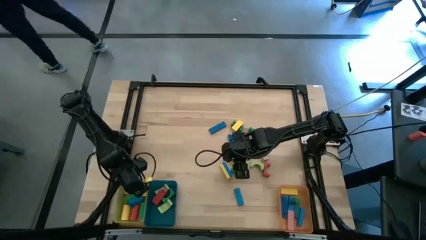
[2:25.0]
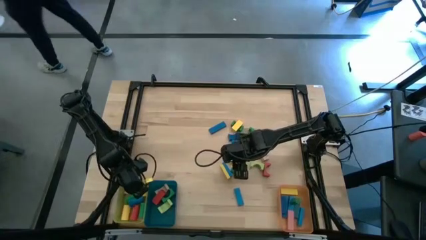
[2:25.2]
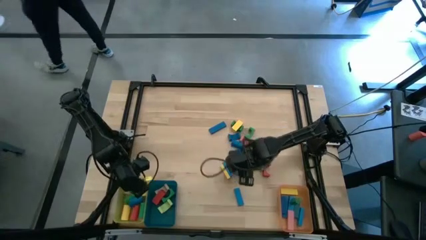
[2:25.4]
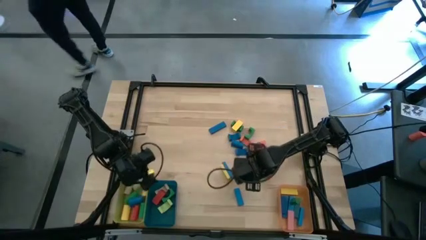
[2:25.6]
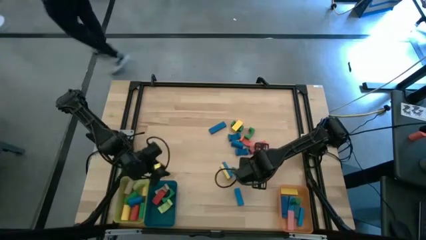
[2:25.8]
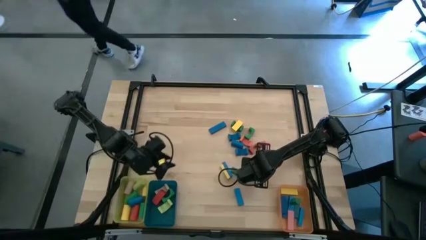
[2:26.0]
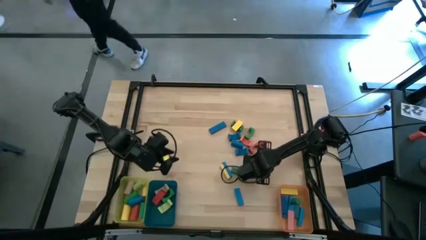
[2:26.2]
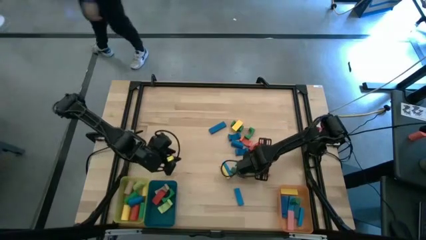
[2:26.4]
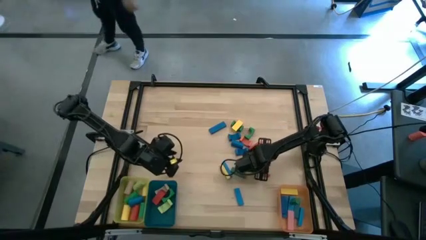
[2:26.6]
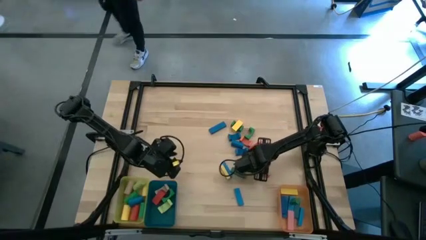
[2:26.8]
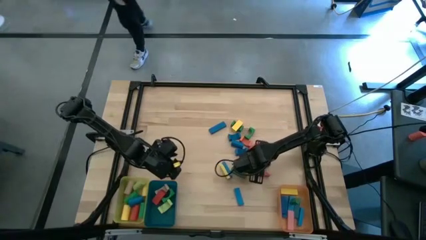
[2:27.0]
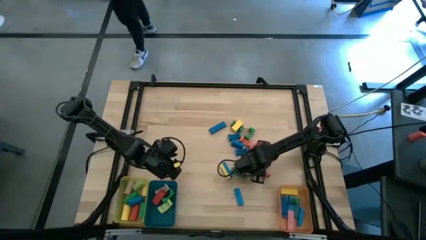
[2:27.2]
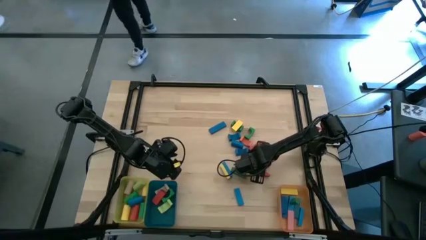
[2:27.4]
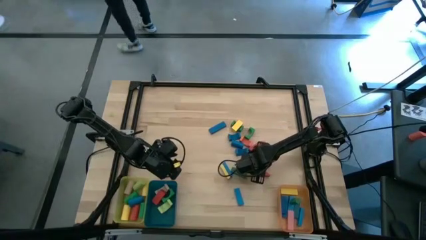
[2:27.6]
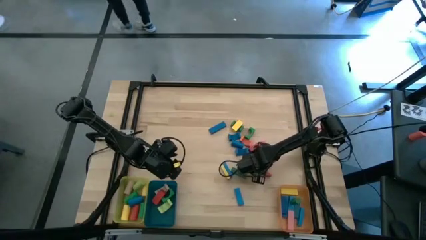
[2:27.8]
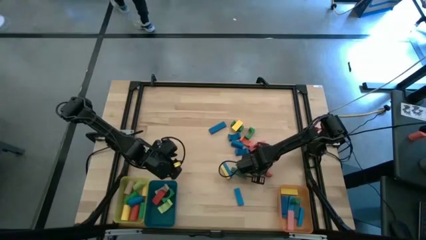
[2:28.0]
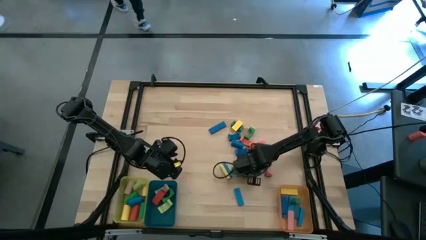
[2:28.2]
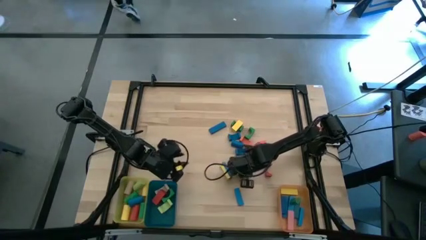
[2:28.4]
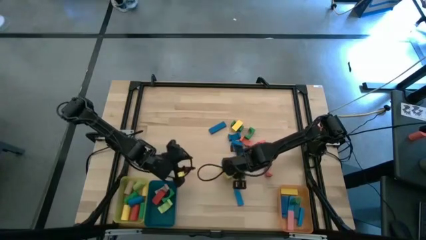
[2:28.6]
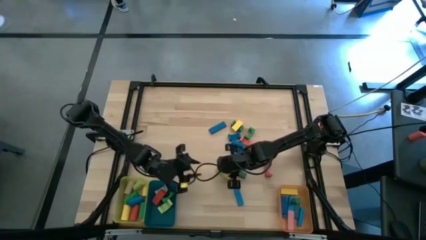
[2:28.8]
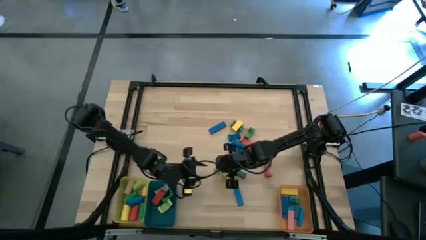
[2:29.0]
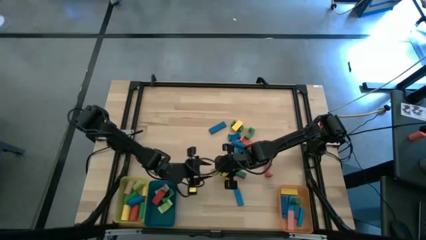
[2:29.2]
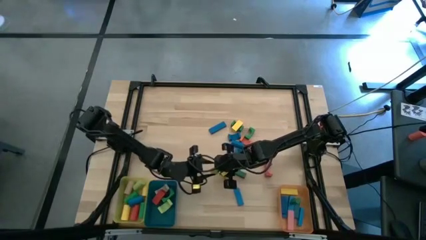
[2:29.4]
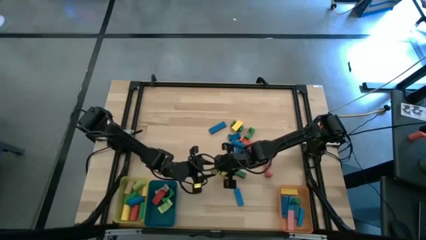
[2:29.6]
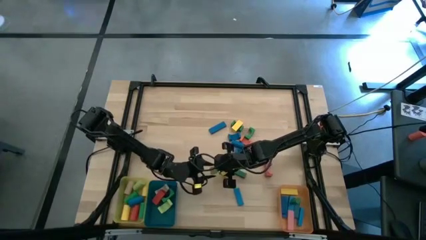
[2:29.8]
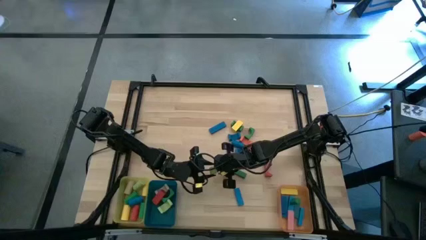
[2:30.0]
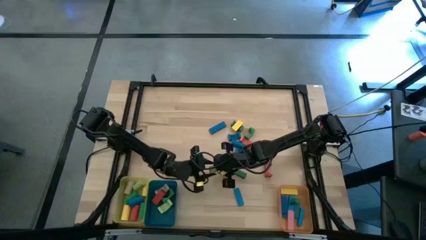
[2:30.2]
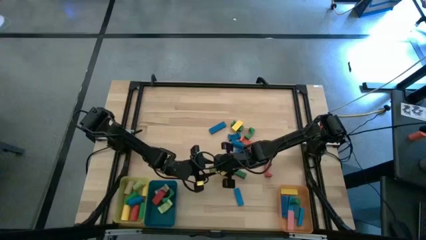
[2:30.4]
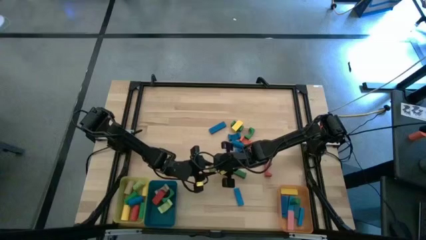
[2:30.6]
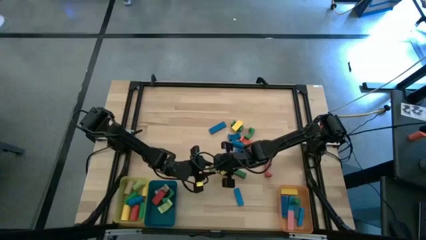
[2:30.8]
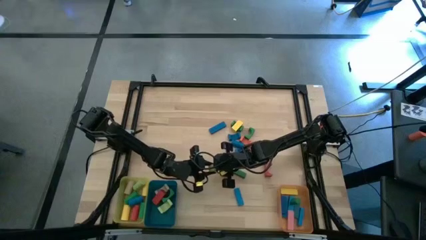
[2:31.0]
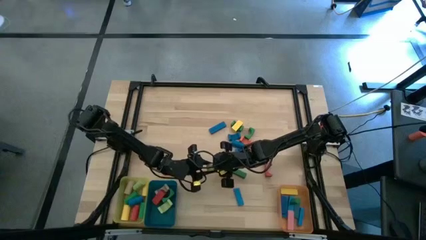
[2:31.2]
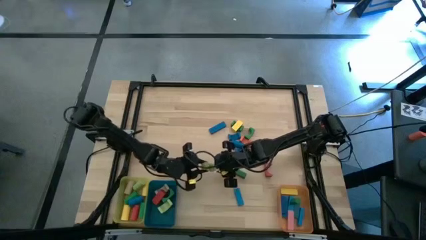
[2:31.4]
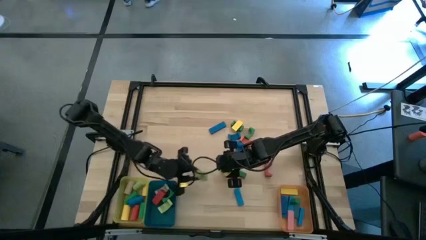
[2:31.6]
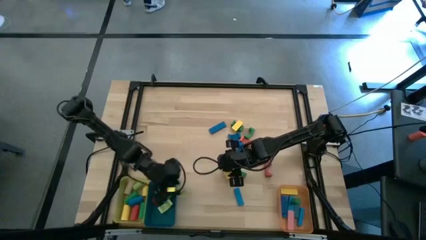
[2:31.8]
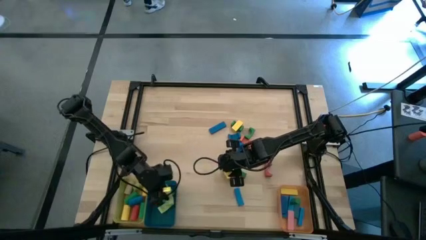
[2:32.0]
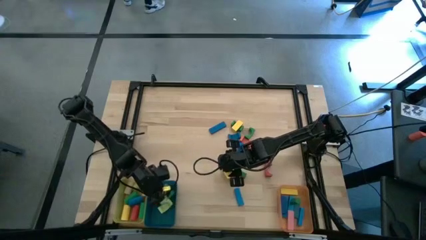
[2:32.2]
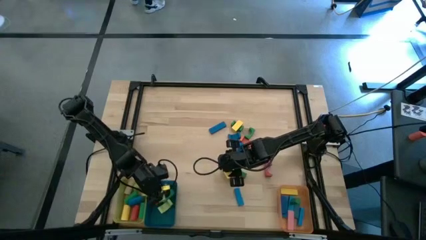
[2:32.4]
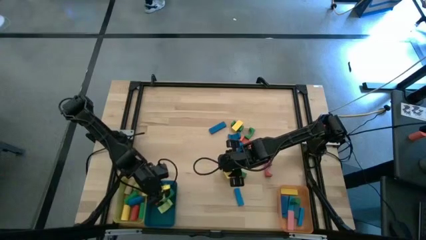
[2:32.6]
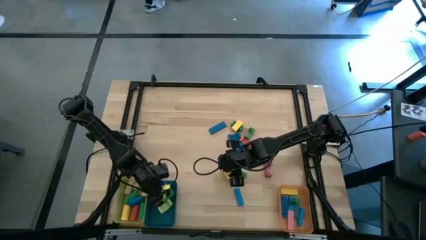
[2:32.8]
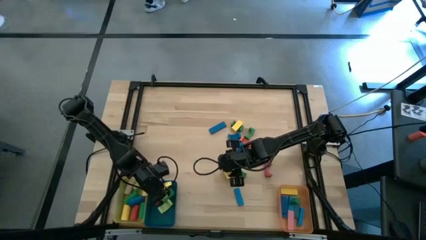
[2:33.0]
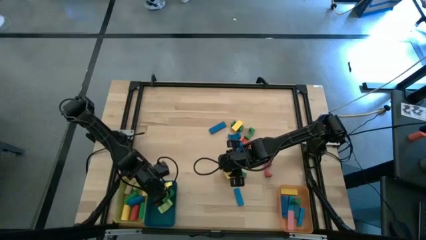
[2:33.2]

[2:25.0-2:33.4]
Task: Sort blocks by size
Put the light green arch block into the blue bin

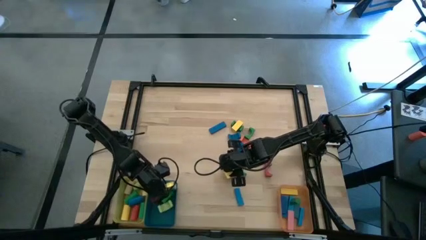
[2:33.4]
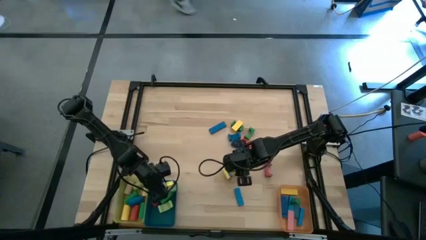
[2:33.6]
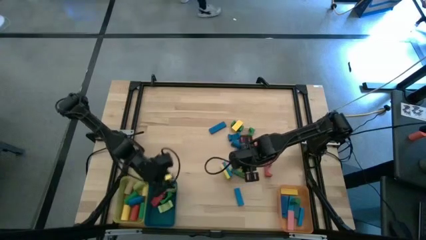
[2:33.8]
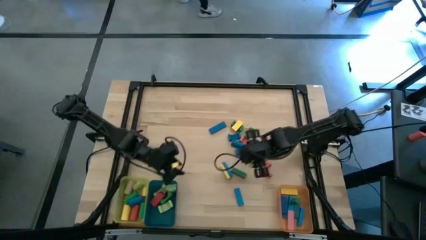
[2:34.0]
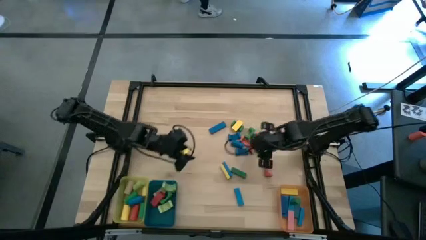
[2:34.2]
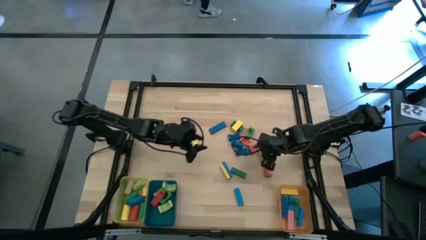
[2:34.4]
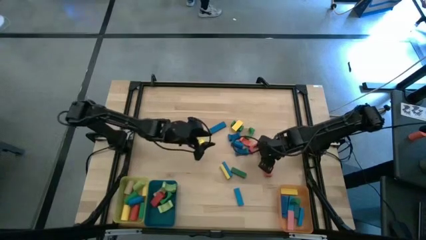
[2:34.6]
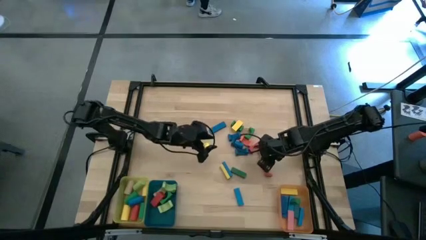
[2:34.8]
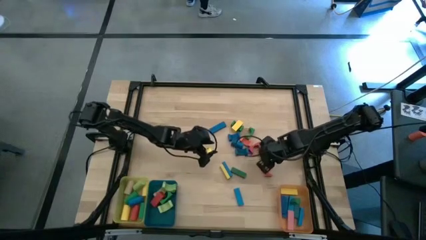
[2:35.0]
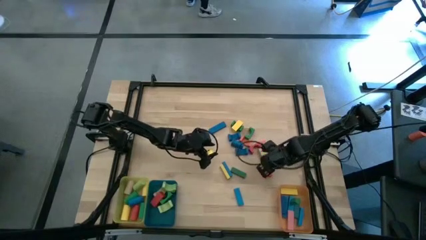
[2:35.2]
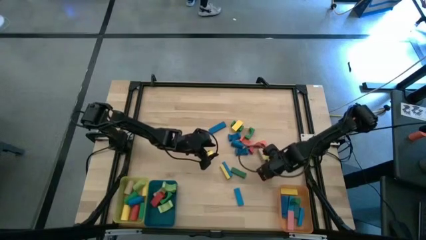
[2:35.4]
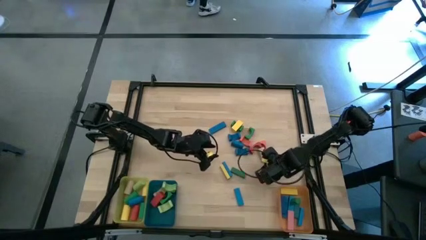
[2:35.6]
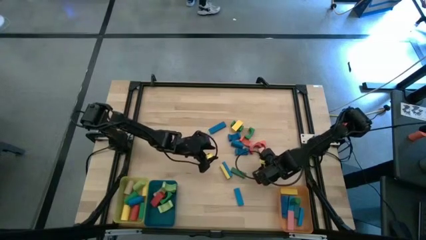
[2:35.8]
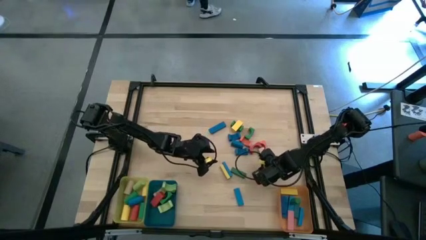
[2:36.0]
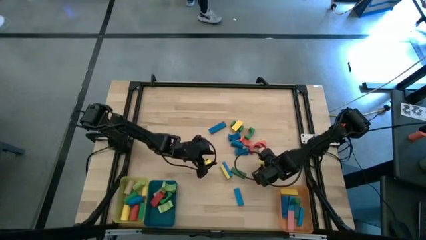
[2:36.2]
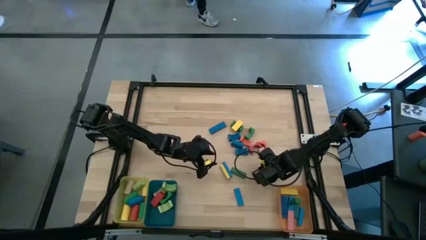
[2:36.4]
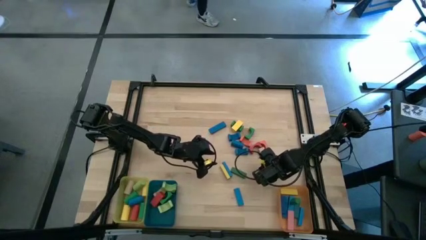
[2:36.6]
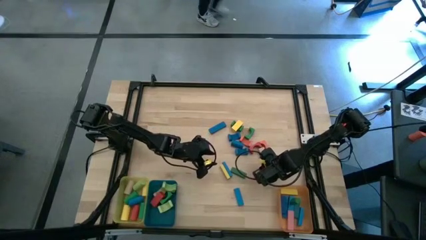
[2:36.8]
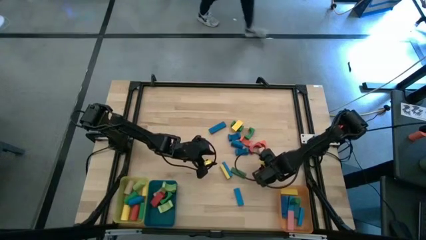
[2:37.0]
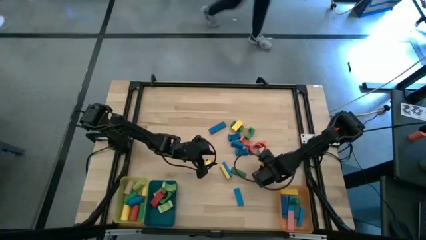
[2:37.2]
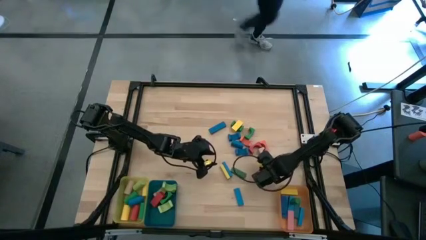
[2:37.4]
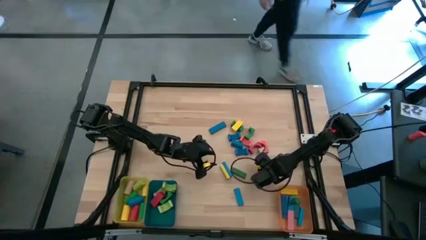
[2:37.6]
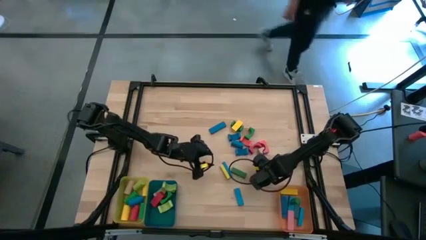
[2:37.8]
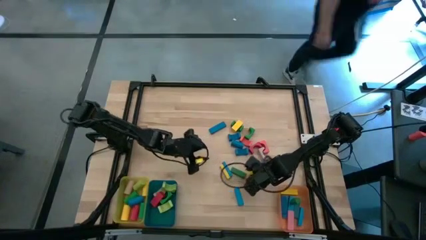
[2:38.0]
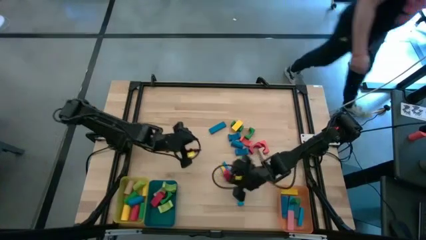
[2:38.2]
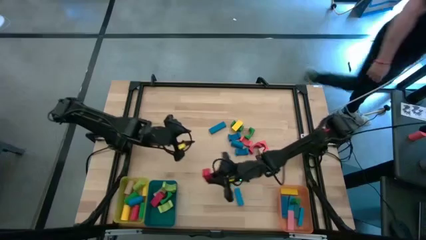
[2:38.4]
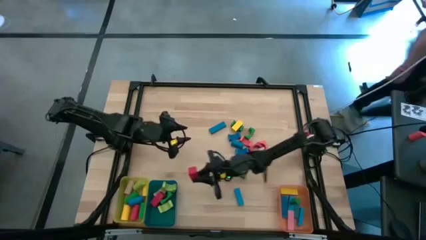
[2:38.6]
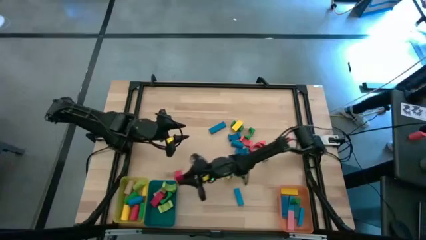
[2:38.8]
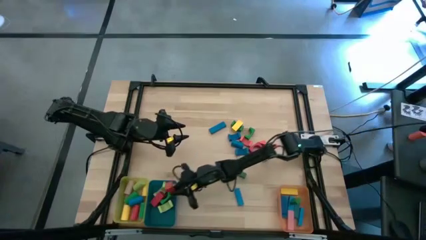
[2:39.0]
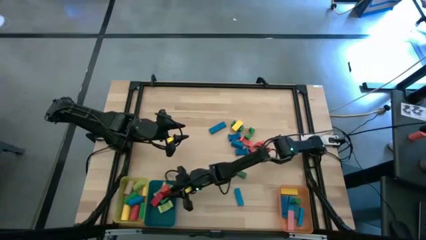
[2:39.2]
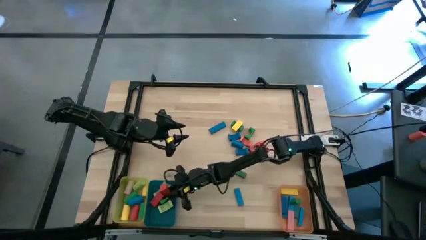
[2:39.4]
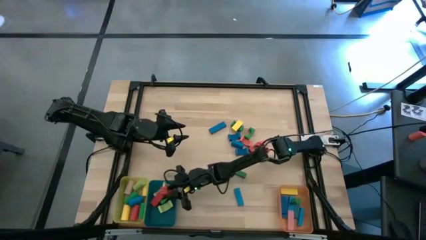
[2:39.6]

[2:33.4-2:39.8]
Put the red arch block into the blue bin

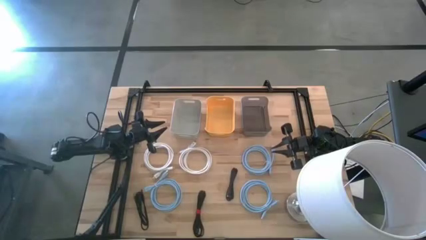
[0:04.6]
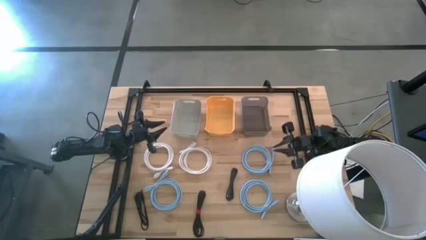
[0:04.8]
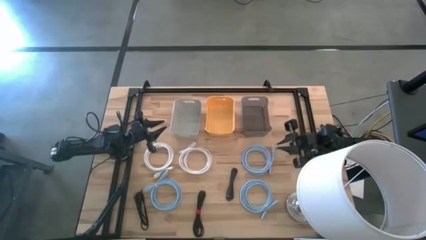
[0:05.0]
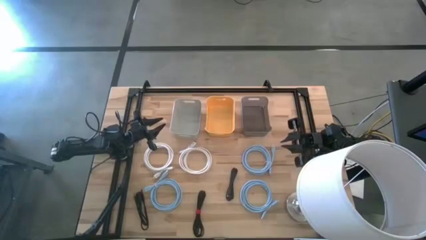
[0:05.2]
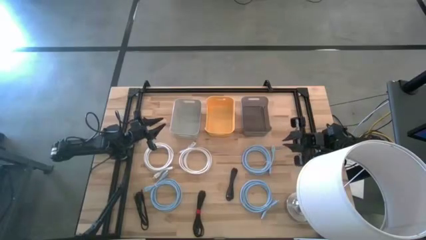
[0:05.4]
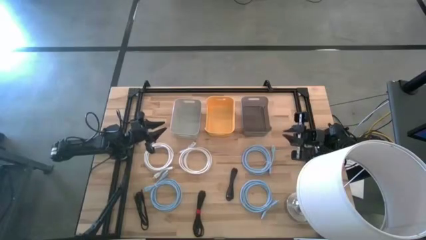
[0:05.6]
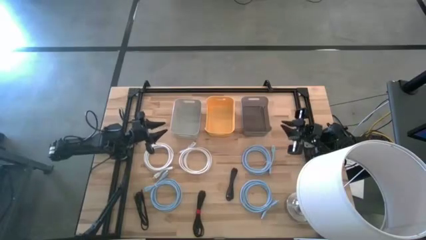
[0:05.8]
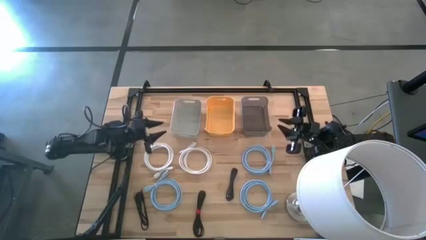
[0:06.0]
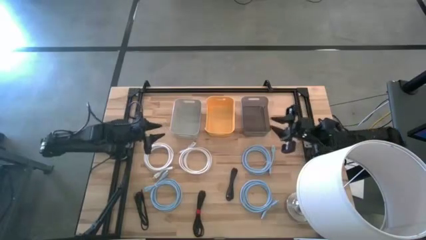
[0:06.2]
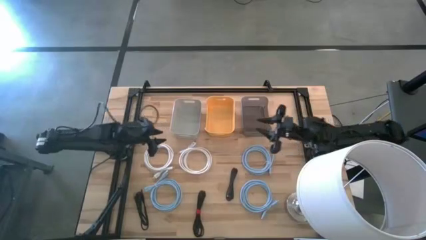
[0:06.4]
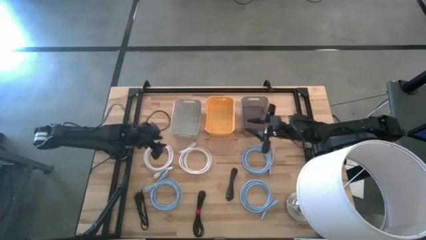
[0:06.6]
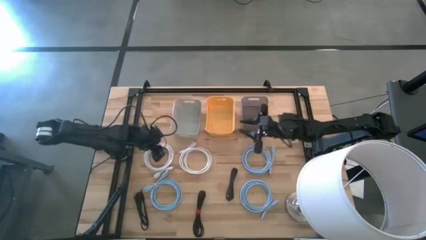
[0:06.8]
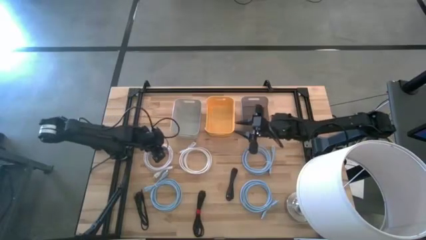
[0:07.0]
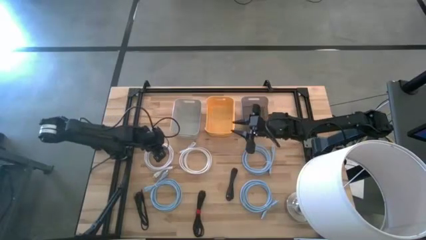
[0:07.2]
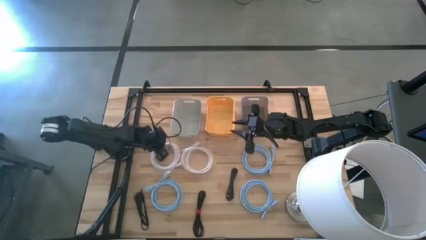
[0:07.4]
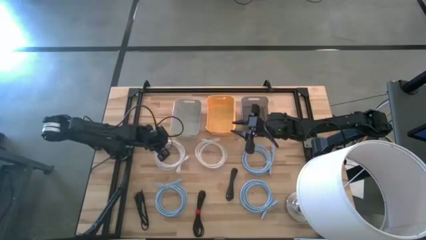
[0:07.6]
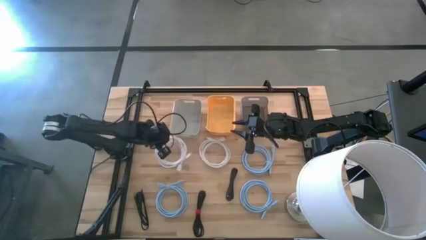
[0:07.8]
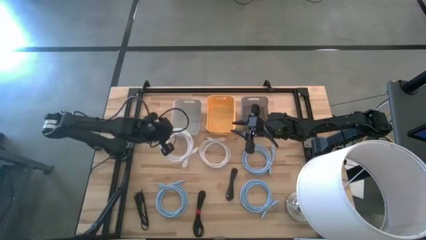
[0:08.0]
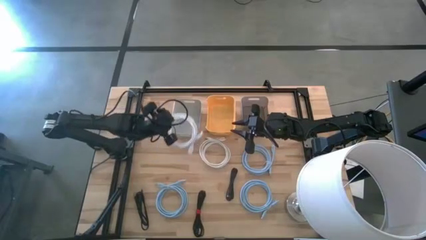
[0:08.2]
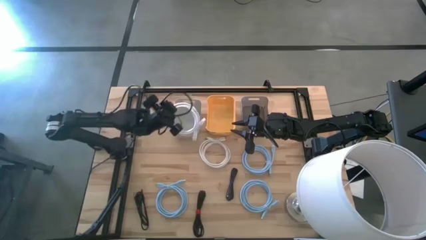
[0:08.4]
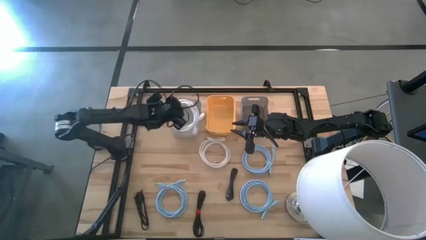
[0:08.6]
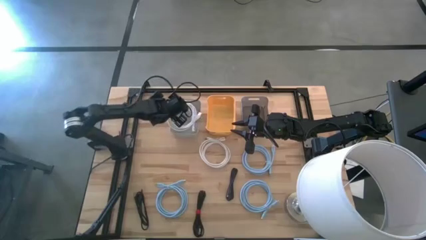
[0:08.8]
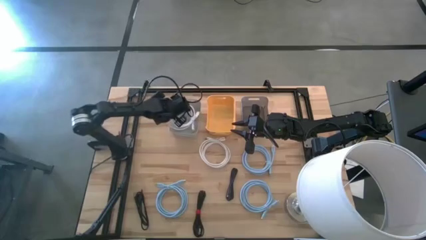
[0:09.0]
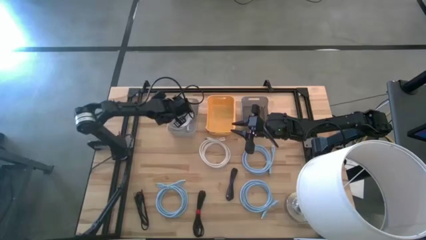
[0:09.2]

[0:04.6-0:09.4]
Task: Sort HDMI cables
Put the left white HDMI cable into the gray bin
